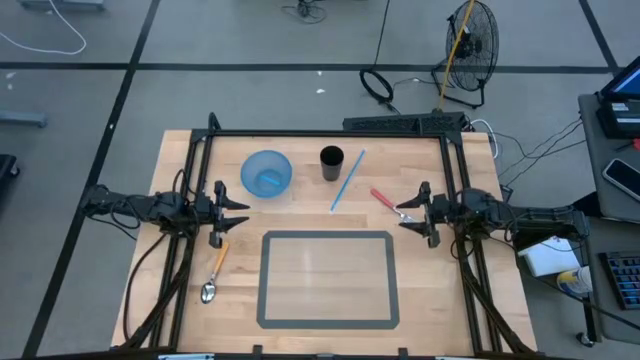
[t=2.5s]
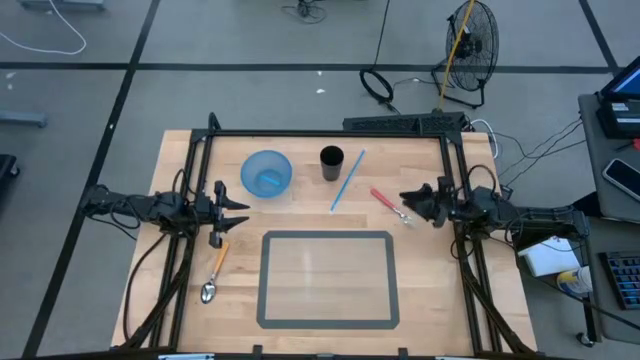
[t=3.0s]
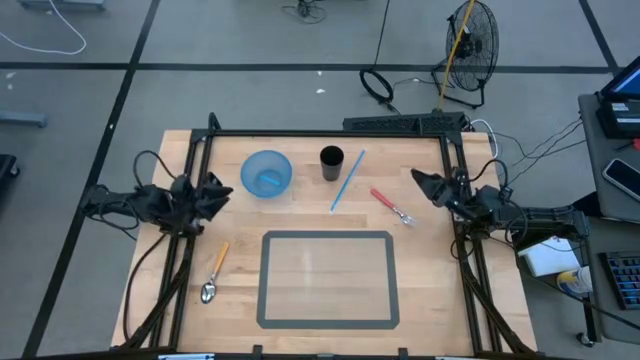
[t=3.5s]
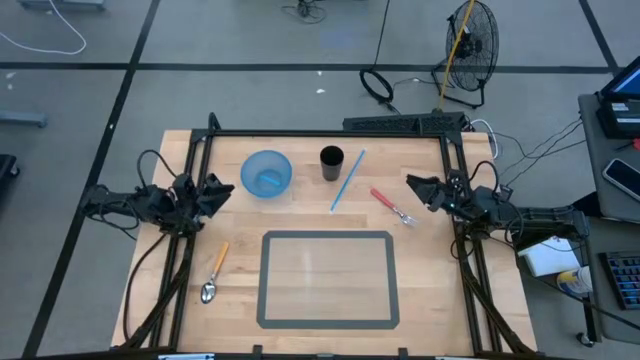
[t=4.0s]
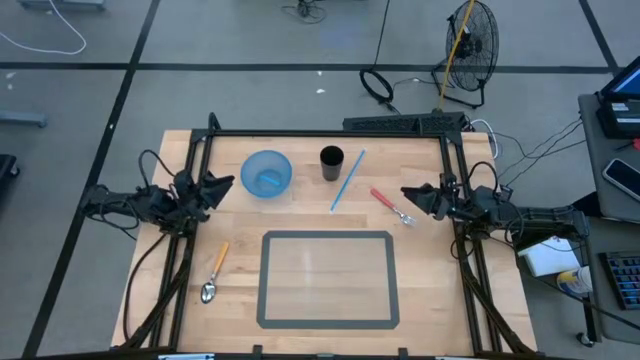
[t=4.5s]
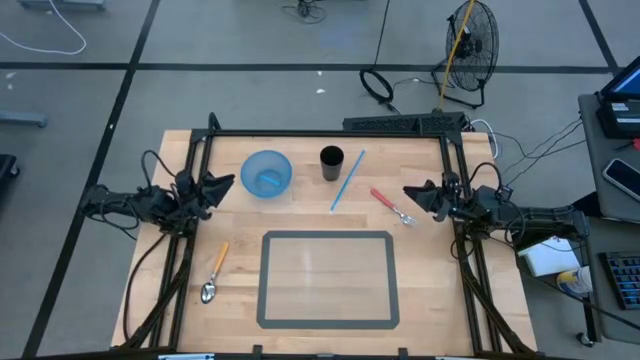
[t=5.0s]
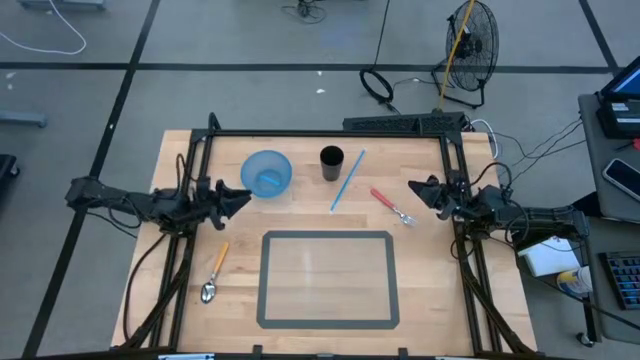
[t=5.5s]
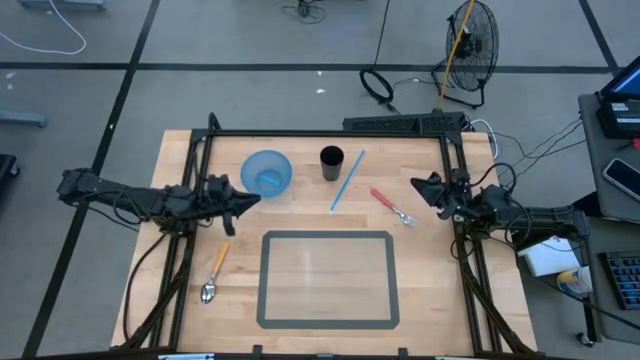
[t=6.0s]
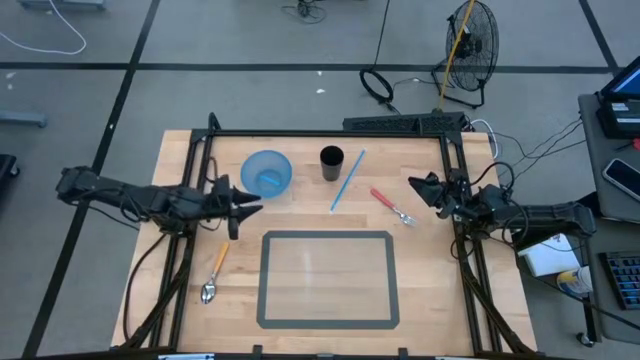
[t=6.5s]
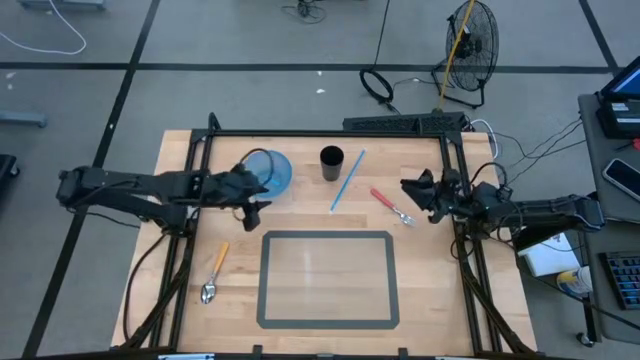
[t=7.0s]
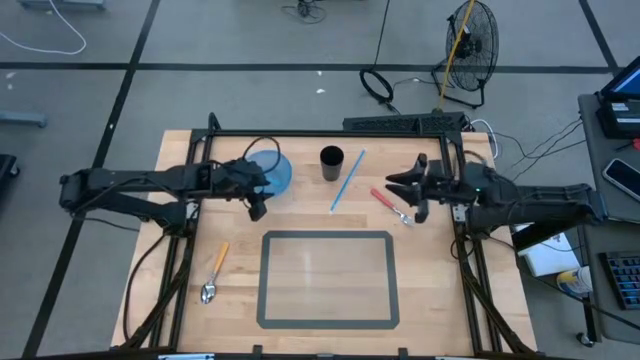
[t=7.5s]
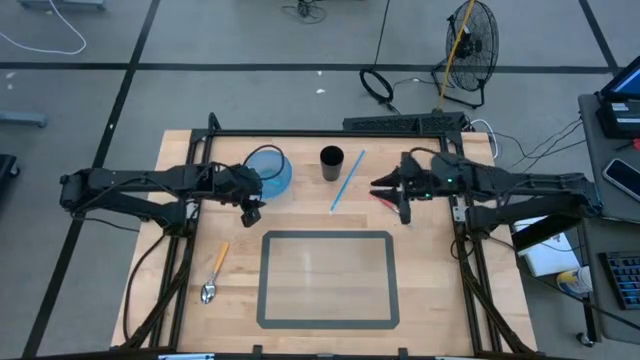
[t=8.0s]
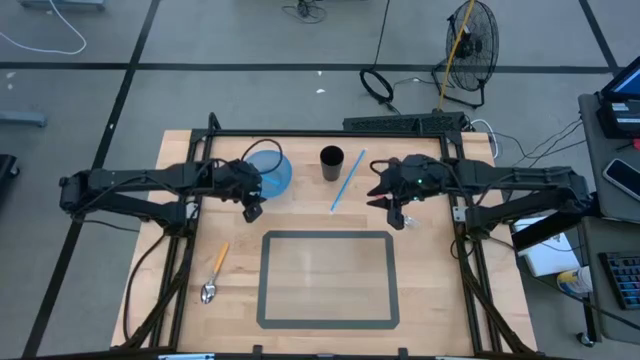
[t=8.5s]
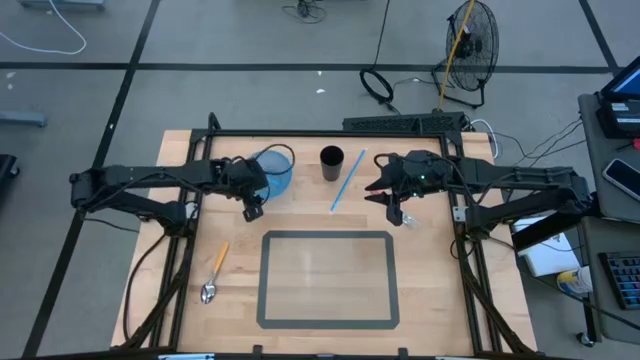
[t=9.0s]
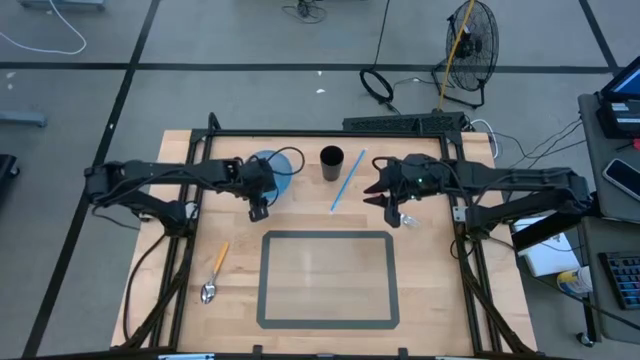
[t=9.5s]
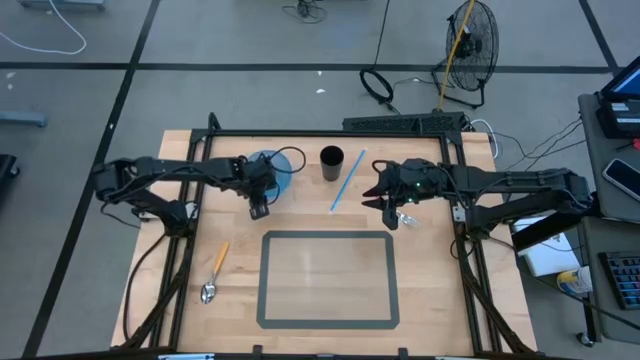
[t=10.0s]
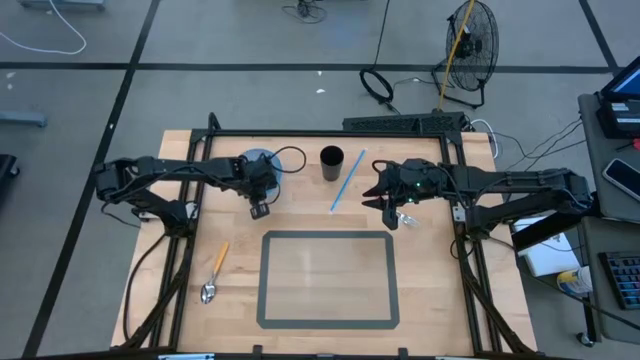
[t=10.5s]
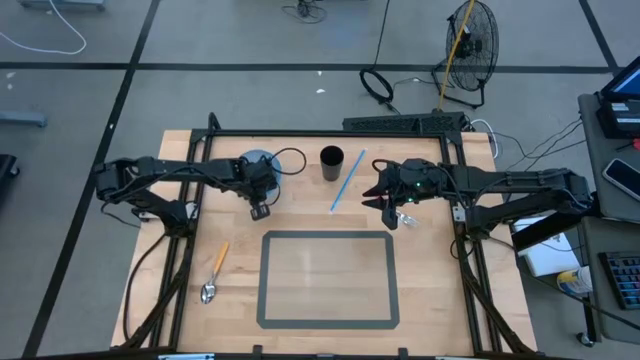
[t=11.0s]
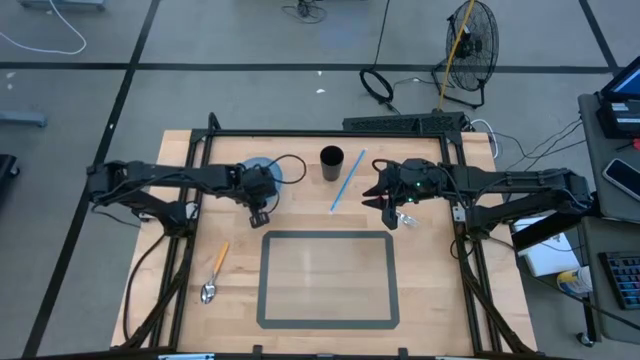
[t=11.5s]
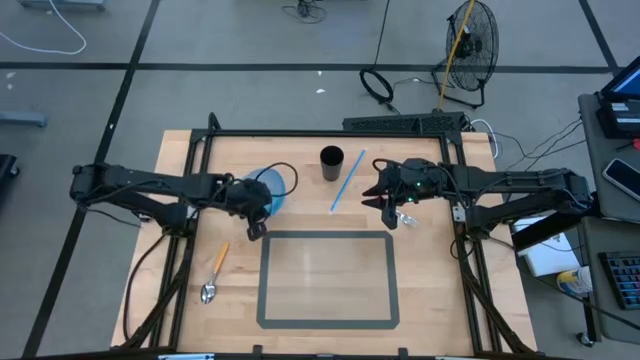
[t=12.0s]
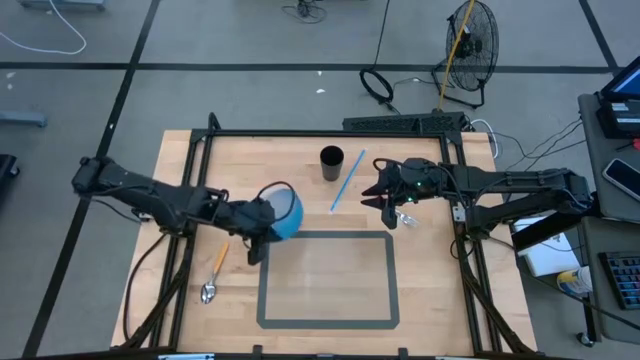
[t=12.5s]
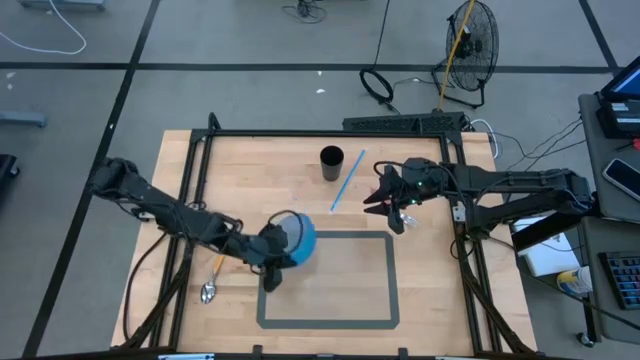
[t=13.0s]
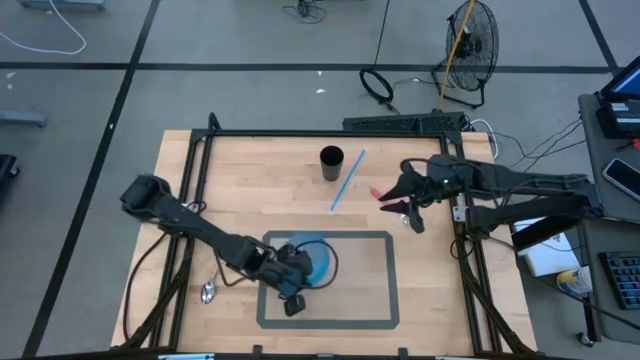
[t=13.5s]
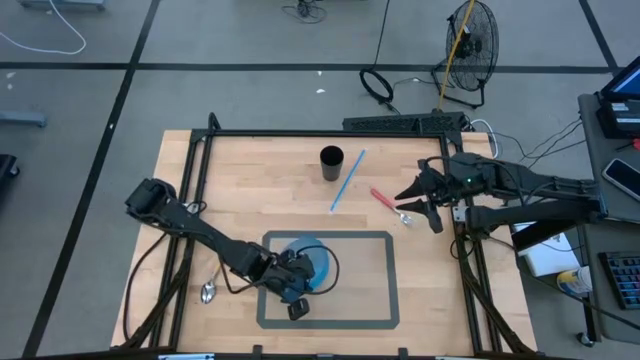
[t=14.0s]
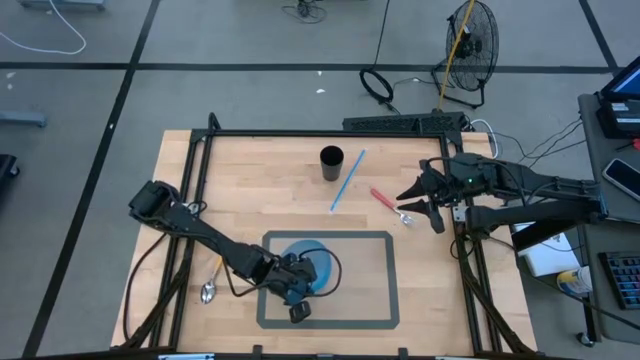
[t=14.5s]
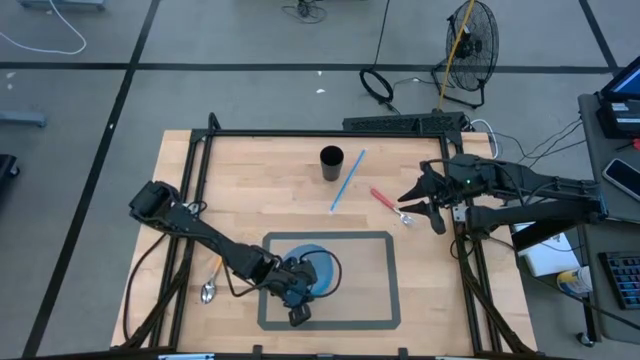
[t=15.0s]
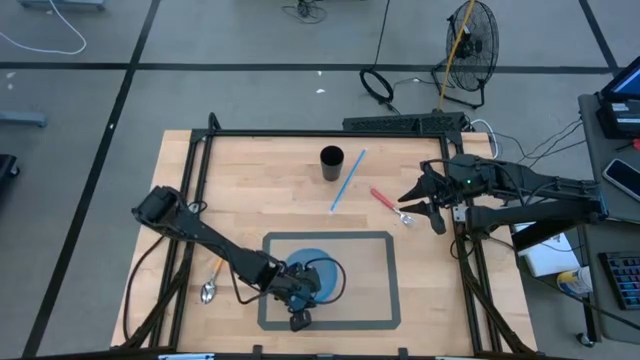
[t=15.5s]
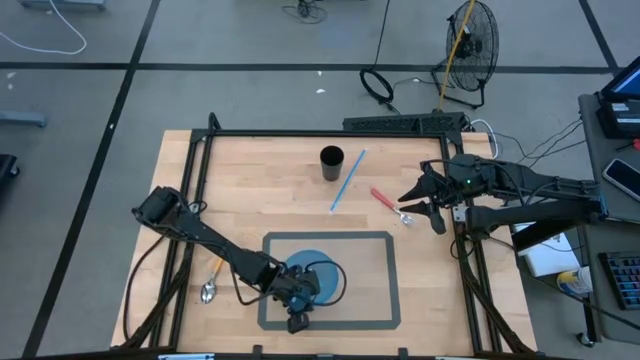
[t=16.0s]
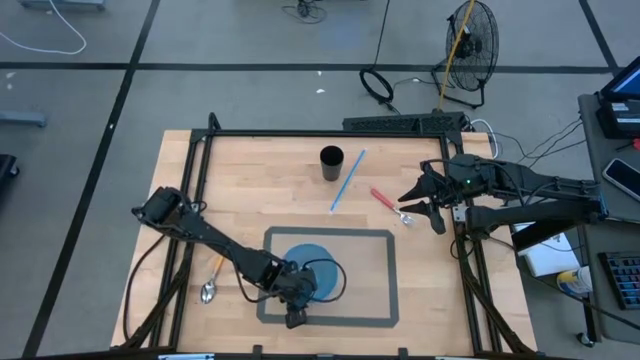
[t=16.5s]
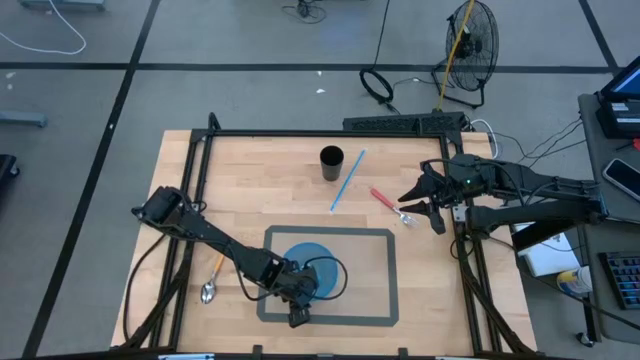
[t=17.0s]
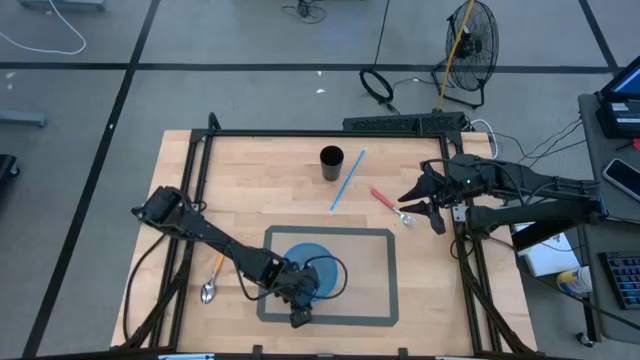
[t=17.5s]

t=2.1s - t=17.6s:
Task: Pick & Place Utensil
Put the blue bowl on the transparent mat

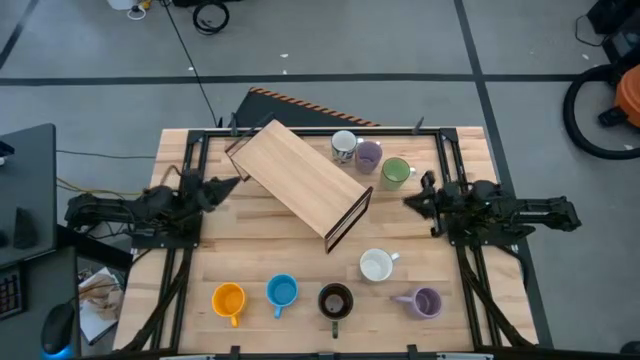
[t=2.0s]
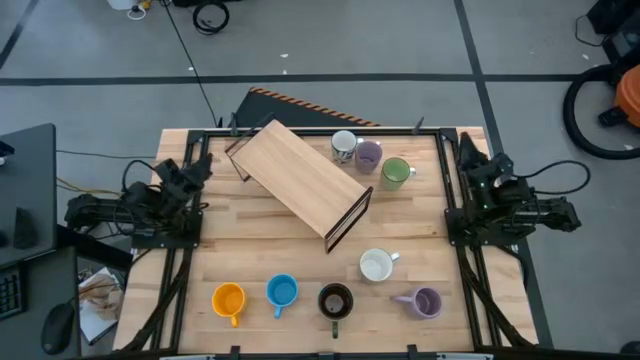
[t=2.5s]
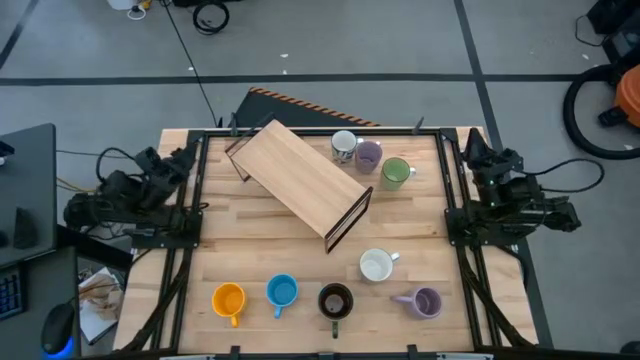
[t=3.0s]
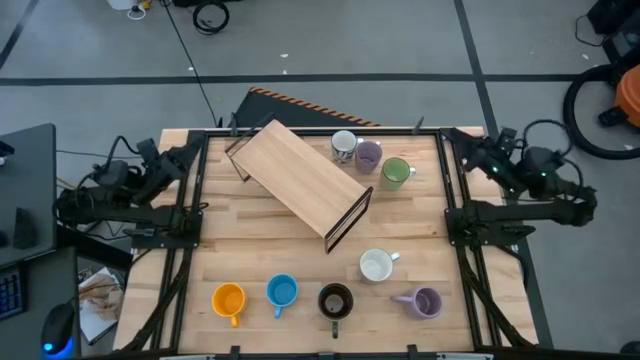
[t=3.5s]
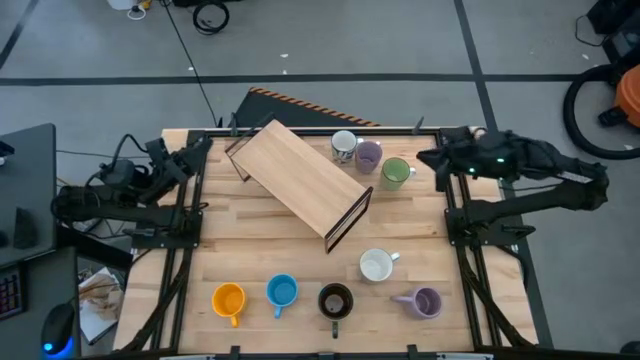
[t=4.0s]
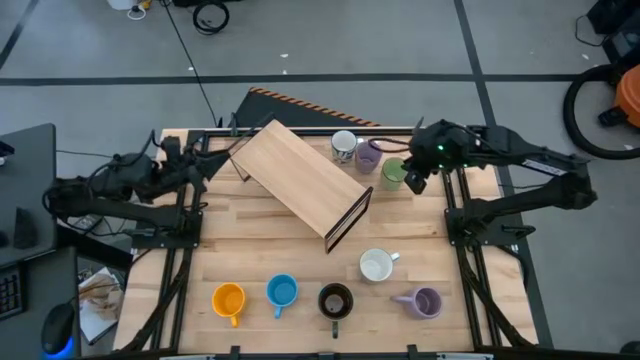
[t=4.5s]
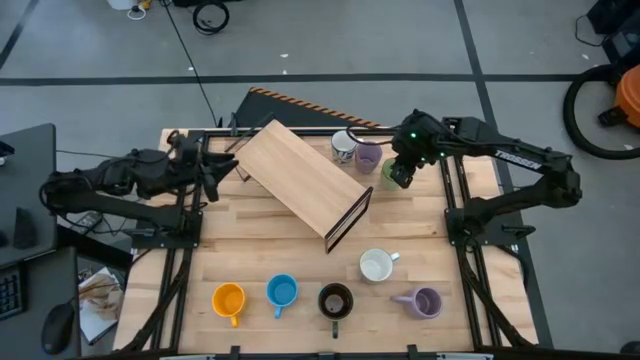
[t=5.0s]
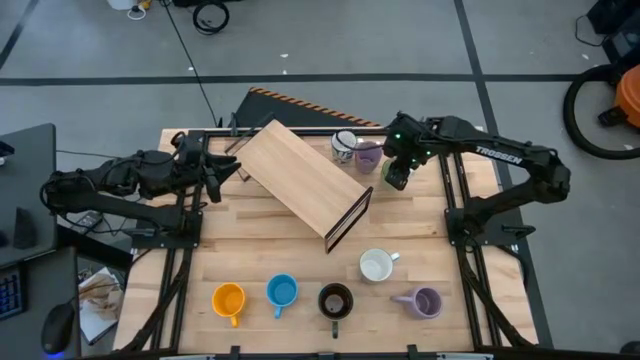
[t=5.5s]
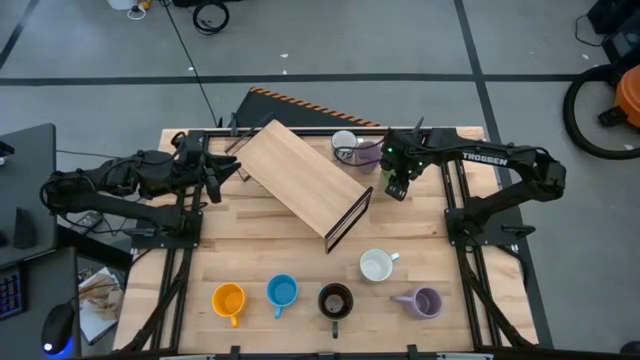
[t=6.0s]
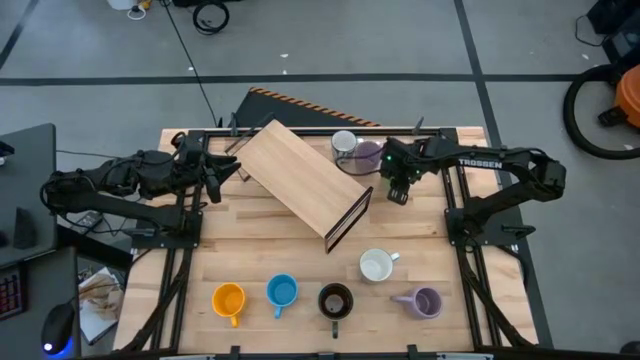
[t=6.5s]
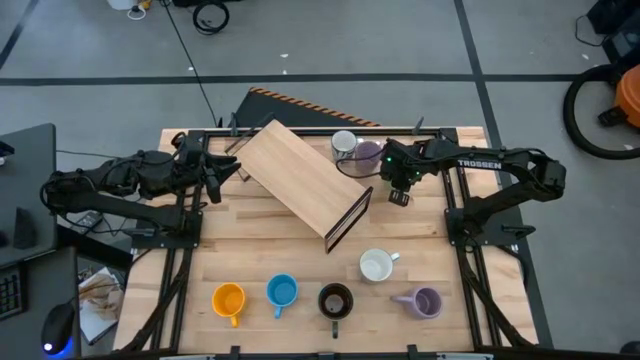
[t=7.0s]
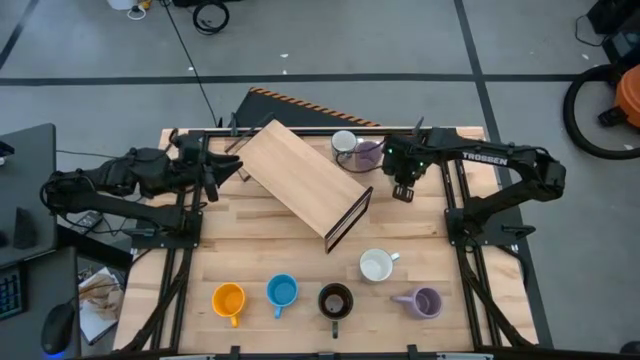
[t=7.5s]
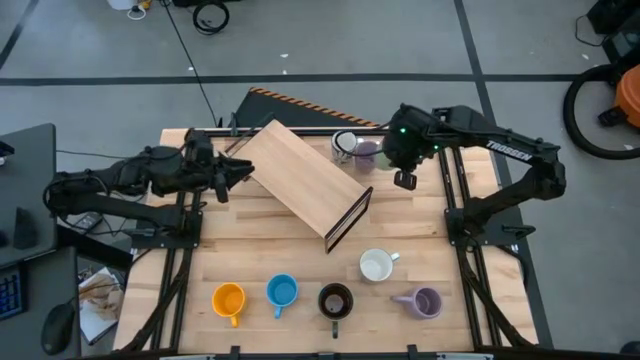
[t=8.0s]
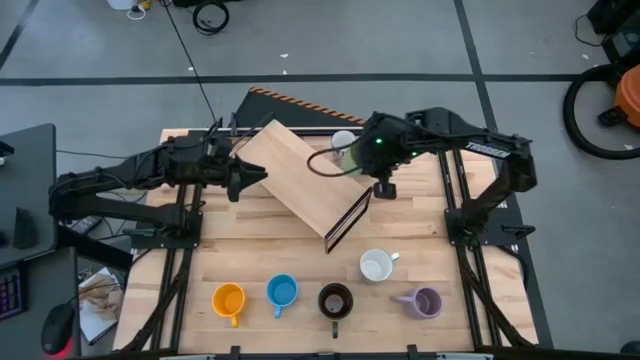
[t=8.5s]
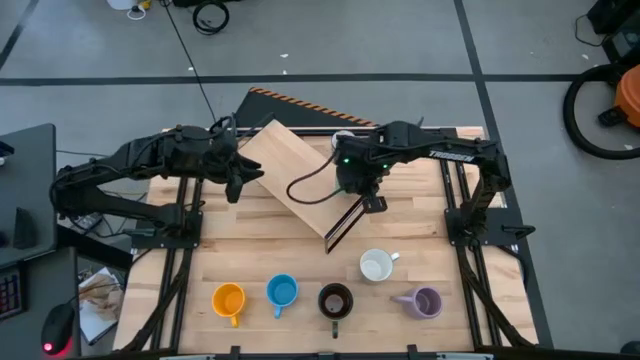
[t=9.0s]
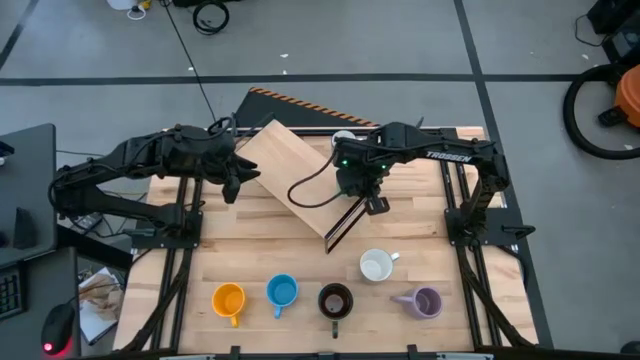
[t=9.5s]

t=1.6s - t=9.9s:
Task: Place coffee mugs
Put the green mug on the shelf
